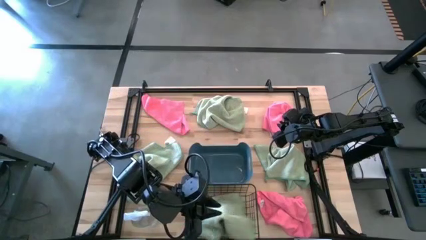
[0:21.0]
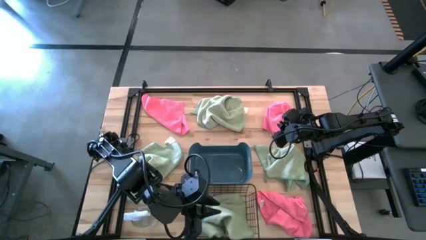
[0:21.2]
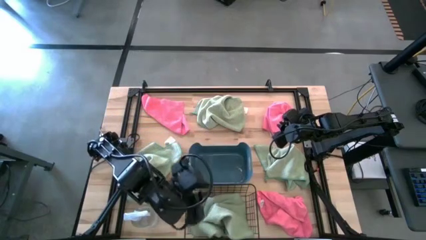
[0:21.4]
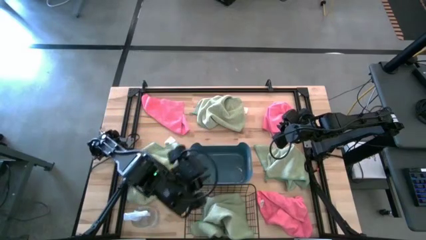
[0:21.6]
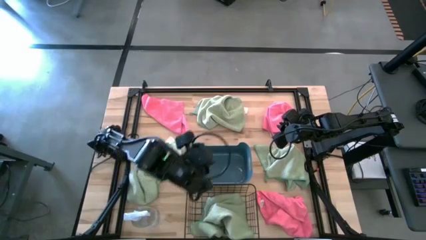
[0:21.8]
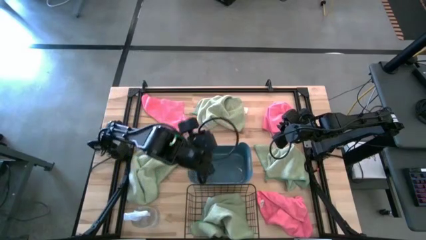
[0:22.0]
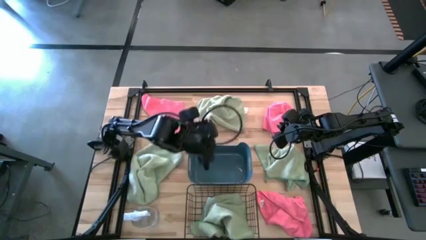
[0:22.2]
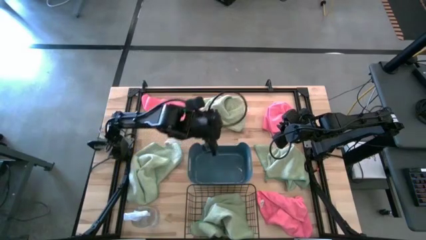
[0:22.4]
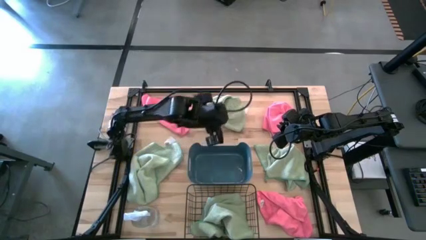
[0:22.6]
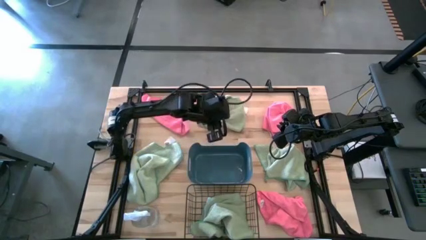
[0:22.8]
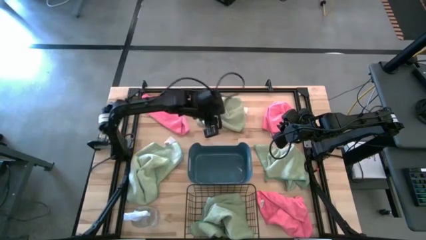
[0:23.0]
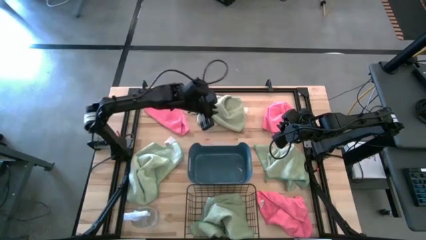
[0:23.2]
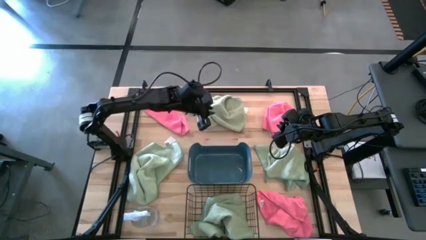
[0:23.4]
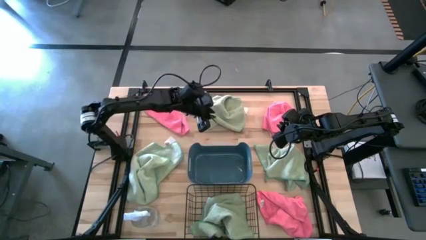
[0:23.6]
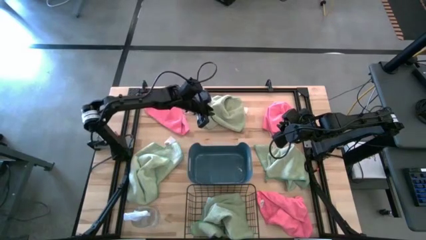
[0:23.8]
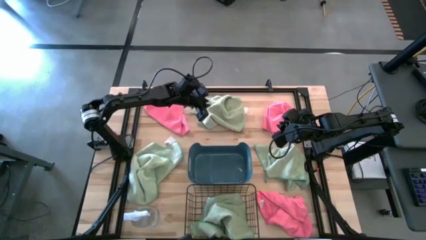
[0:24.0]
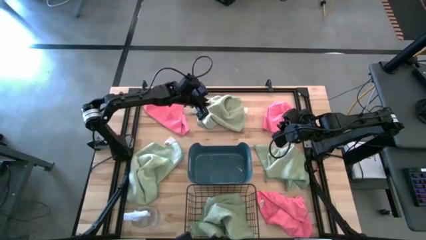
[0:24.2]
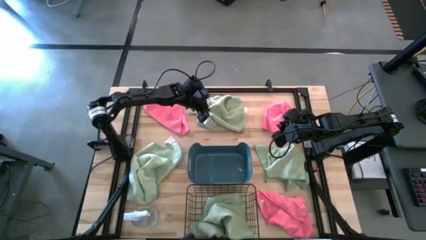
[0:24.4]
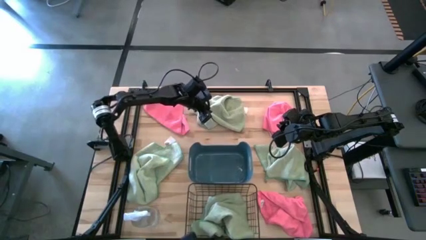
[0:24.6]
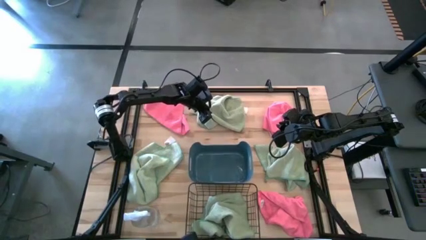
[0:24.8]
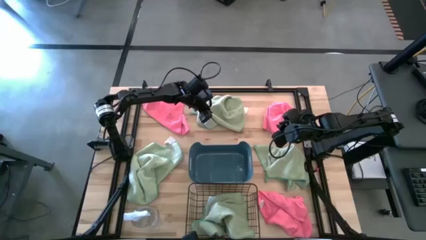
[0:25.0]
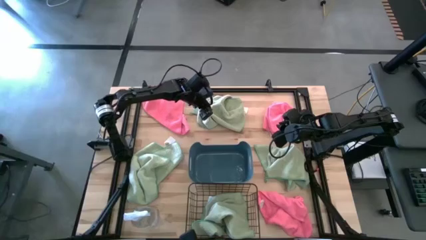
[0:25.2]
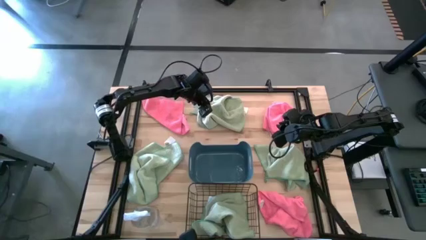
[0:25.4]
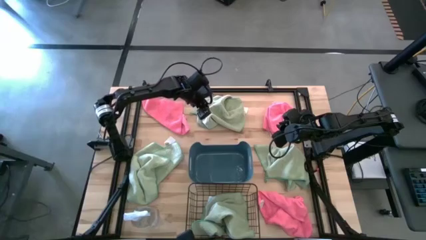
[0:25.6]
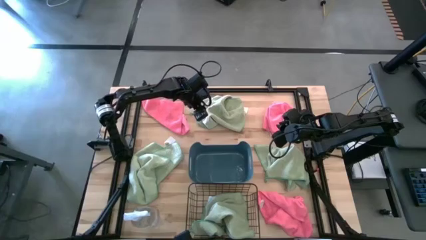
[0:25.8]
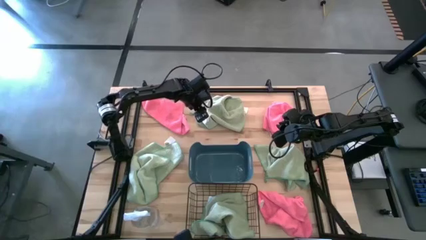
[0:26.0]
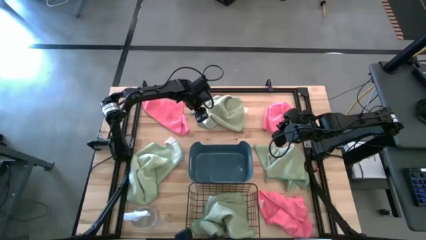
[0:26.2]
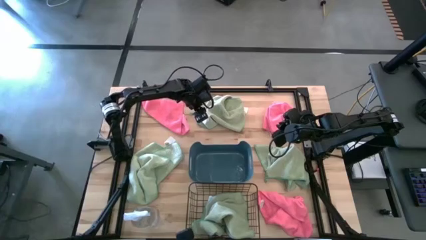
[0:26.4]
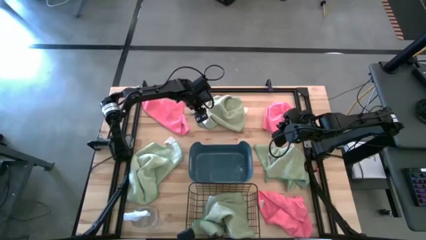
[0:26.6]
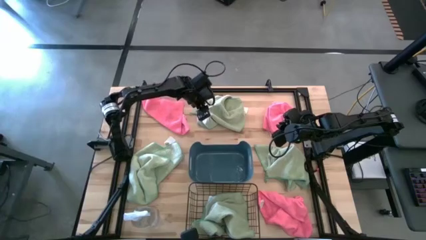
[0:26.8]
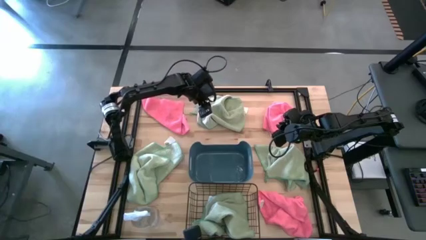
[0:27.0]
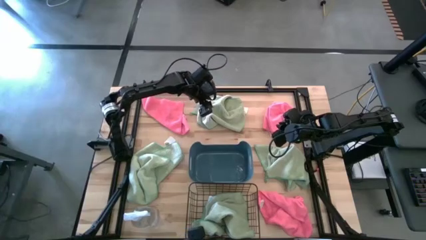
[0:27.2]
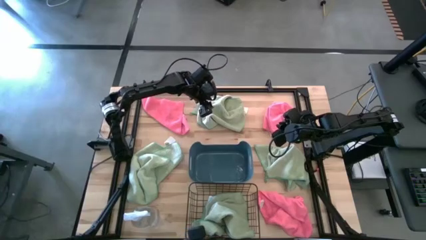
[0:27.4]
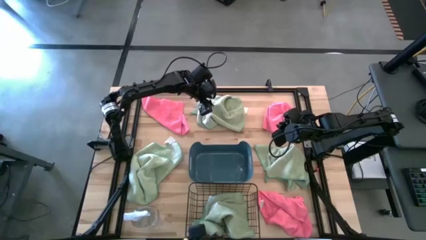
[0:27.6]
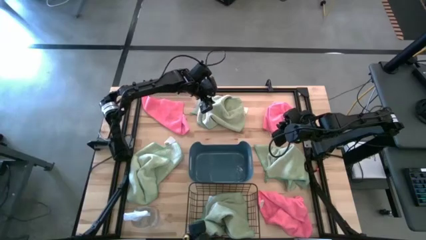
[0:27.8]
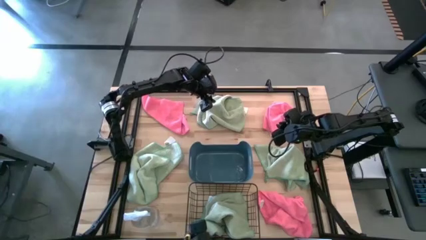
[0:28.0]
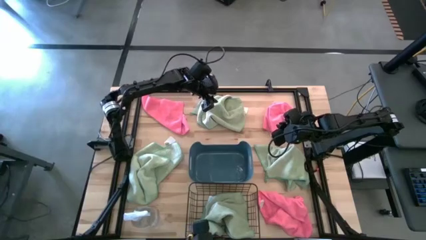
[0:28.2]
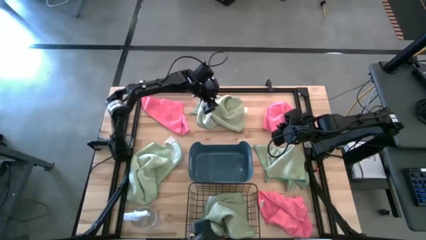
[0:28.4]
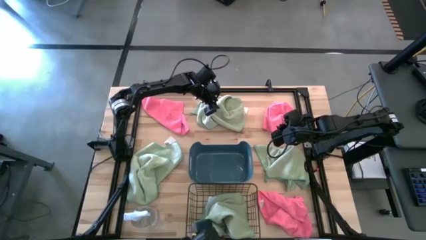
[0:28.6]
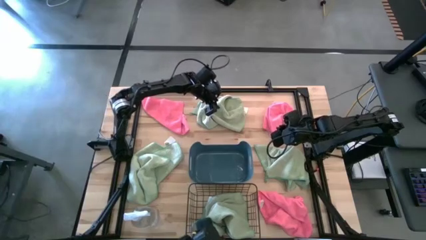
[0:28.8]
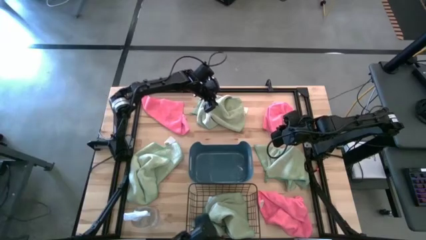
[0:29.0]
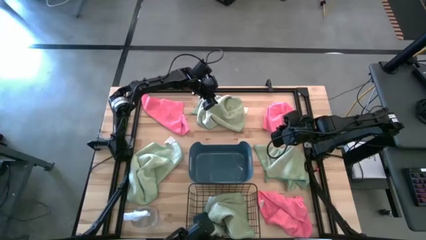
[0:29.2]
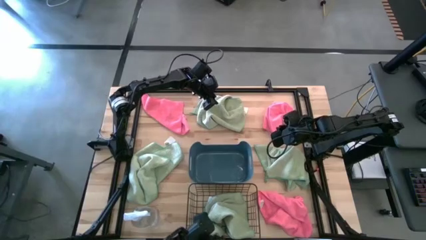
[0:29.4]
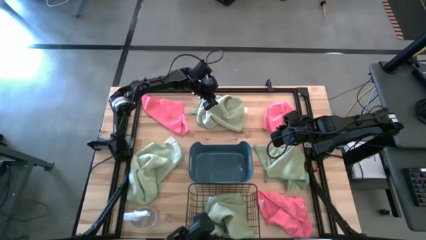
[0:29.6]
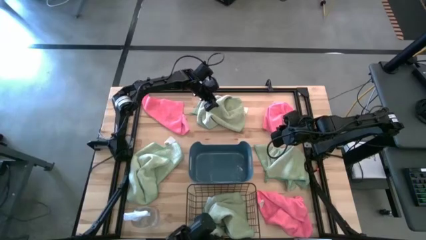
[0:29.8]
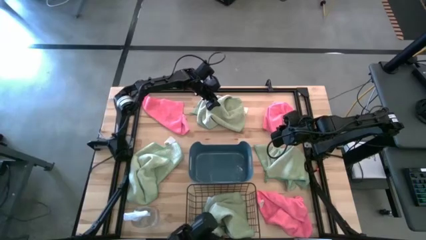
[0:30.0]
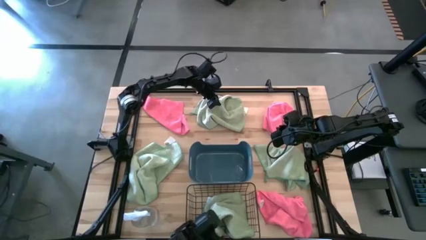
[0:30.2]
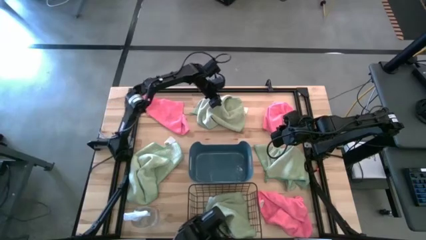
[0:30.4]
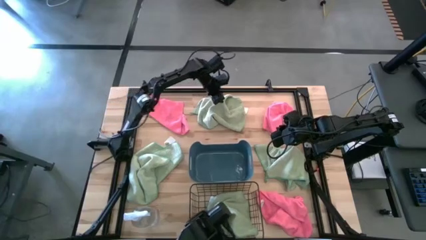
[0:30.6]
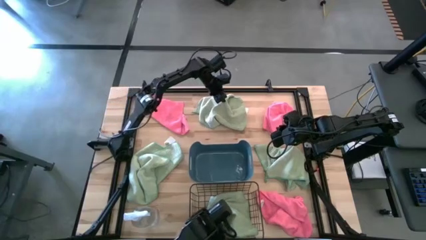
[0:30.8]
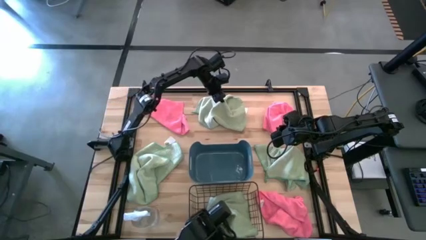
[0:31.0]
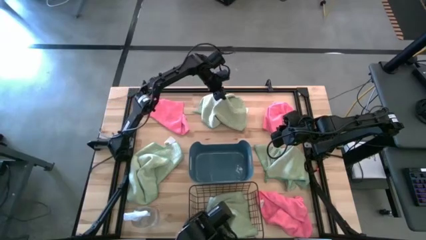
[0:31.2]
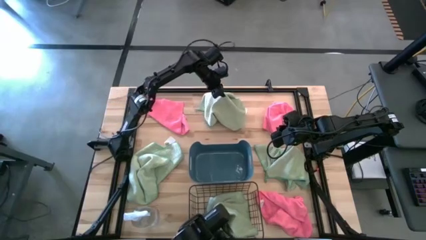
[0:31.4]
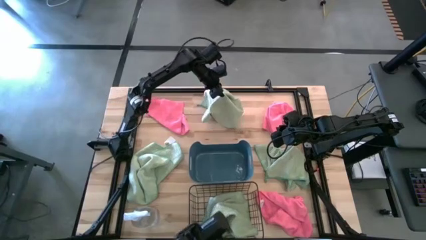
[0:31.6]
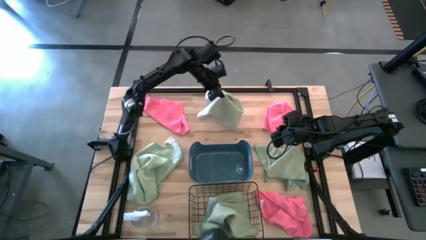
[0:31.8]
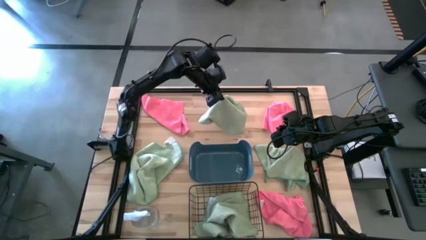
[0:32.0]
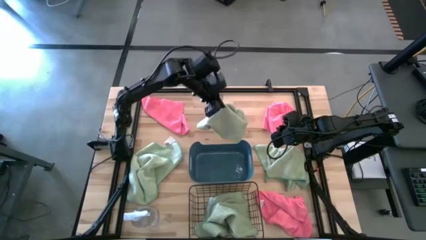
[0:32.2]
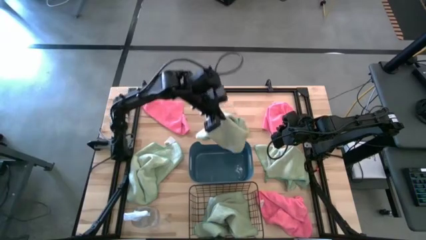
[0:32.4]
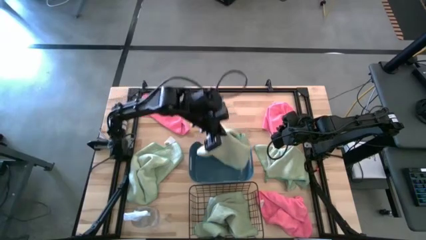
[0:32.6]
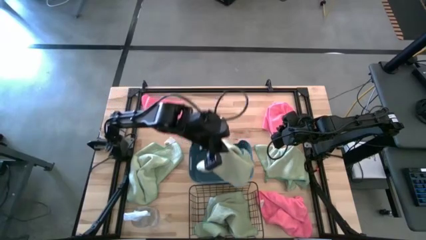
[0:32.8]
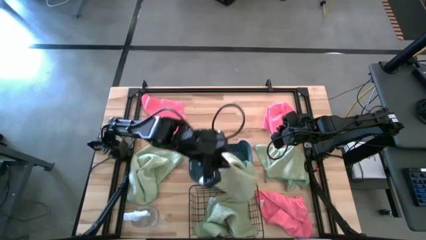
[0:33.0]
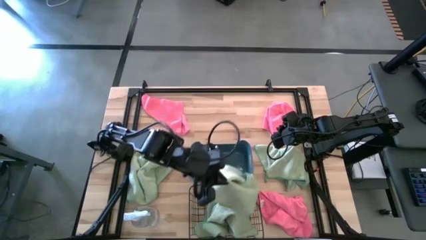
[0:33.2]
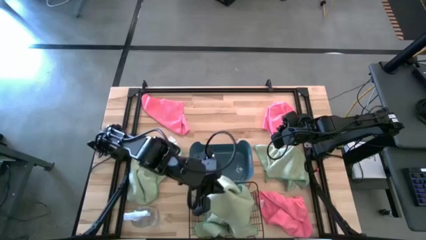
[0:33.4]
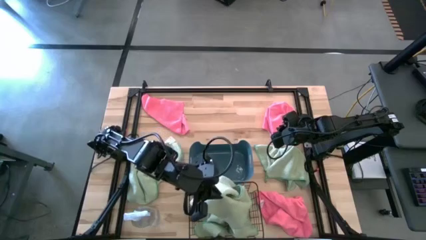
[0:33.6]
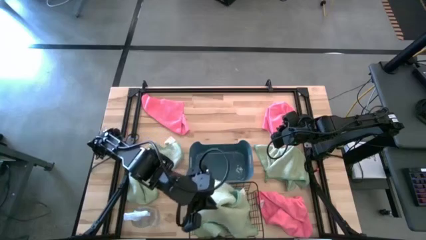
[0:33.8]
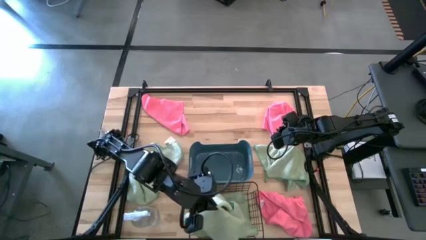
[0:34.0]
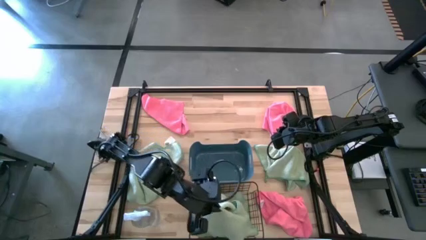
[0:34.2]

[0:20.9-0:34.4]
Task: Sort microfiber towel by color & place in baskets
Put the top green microfiber towel into the mesh storage bin
